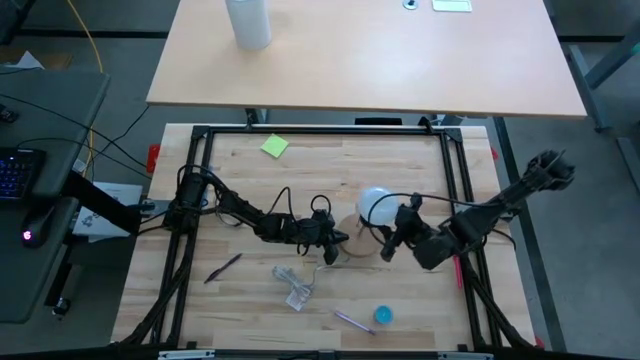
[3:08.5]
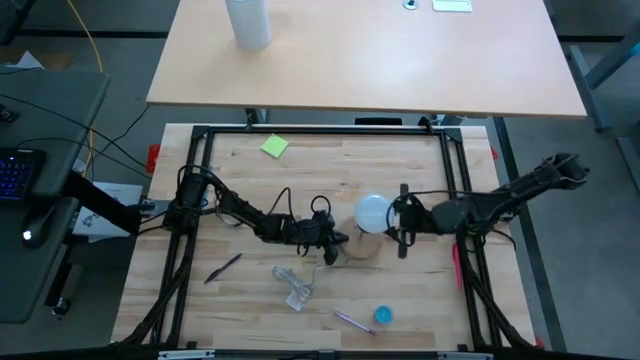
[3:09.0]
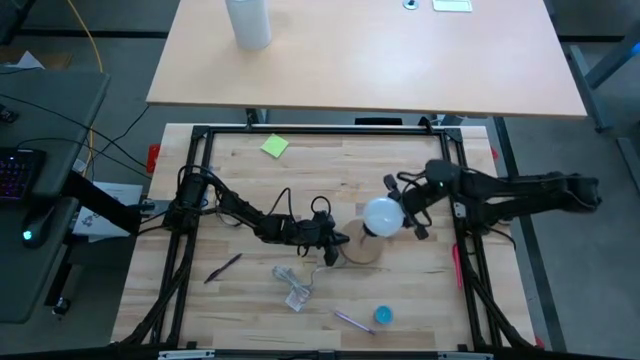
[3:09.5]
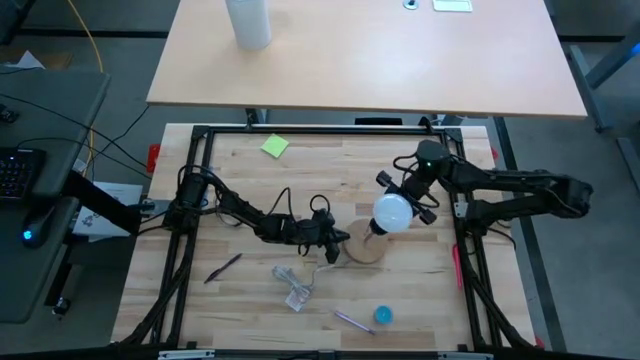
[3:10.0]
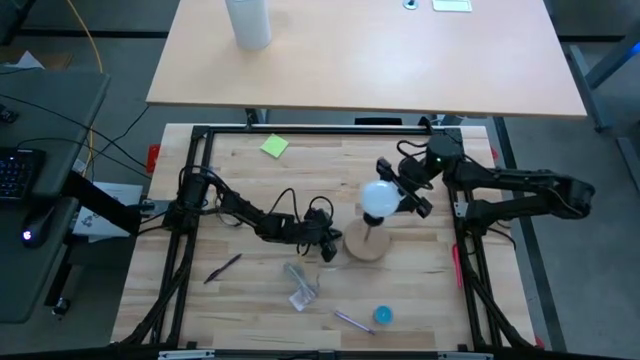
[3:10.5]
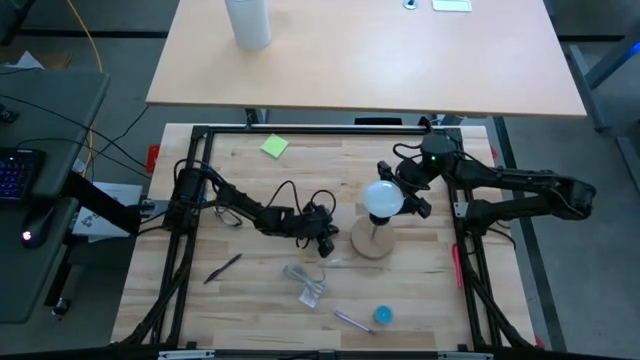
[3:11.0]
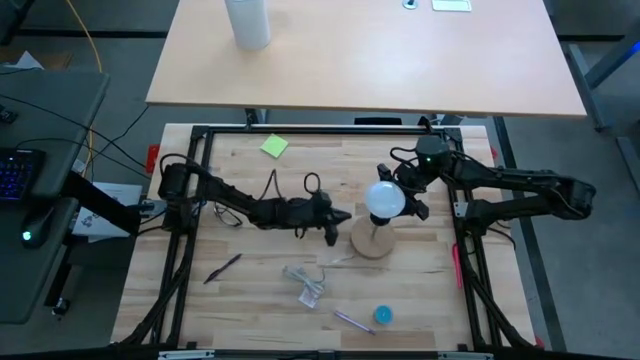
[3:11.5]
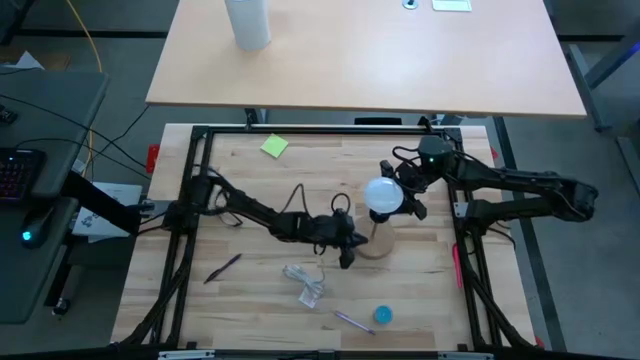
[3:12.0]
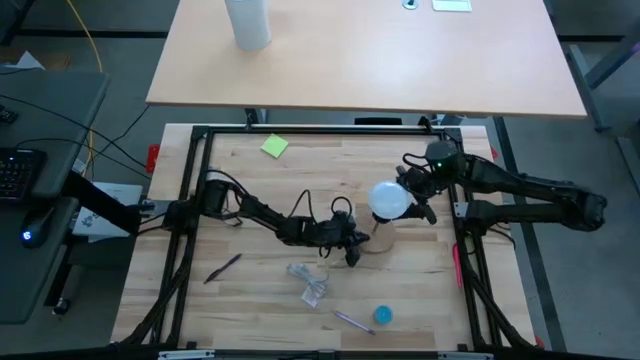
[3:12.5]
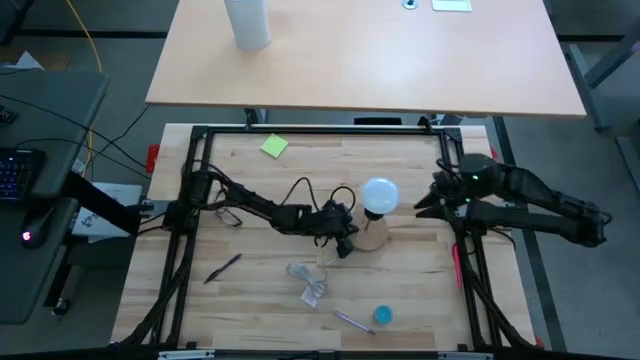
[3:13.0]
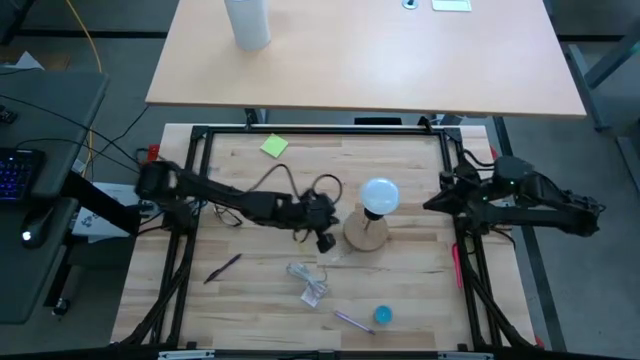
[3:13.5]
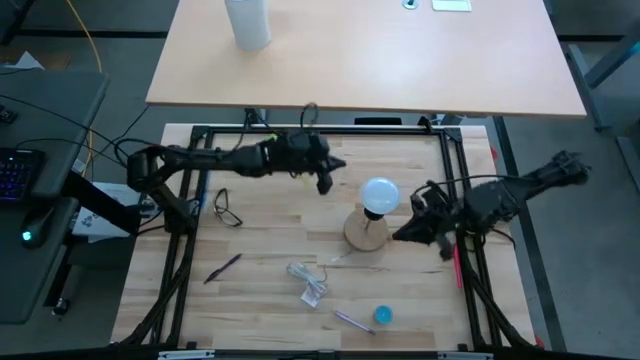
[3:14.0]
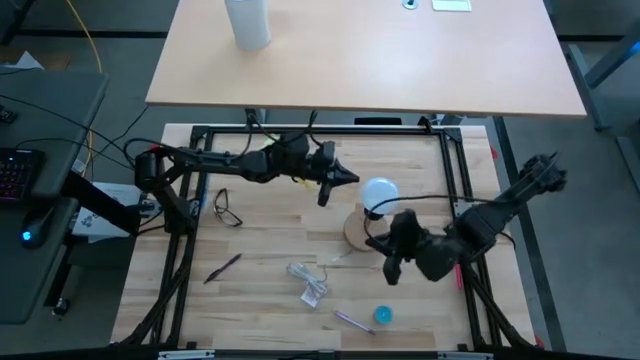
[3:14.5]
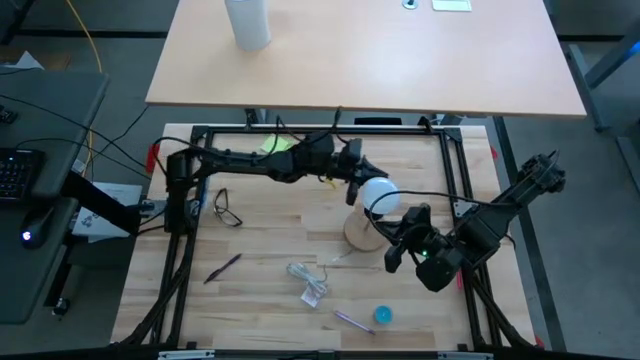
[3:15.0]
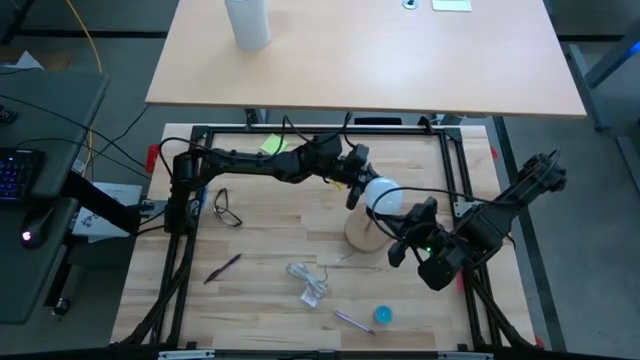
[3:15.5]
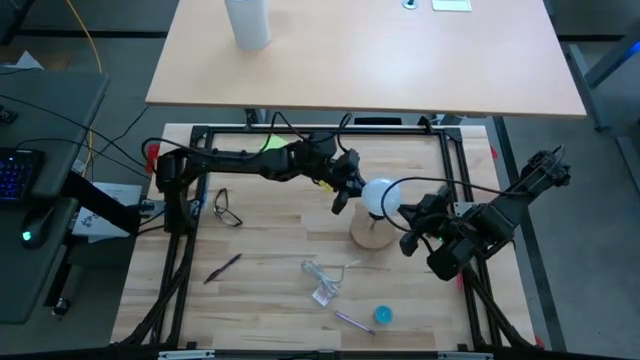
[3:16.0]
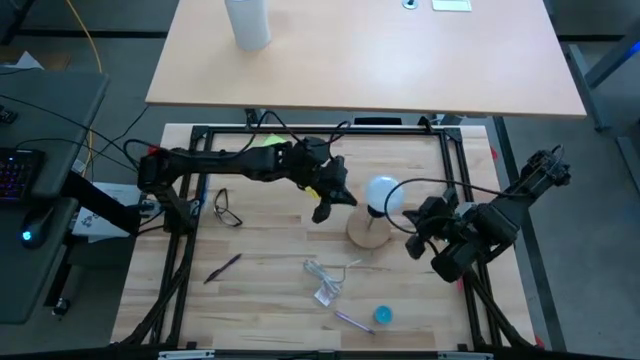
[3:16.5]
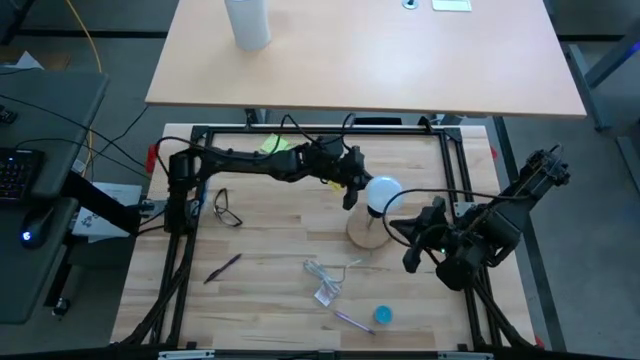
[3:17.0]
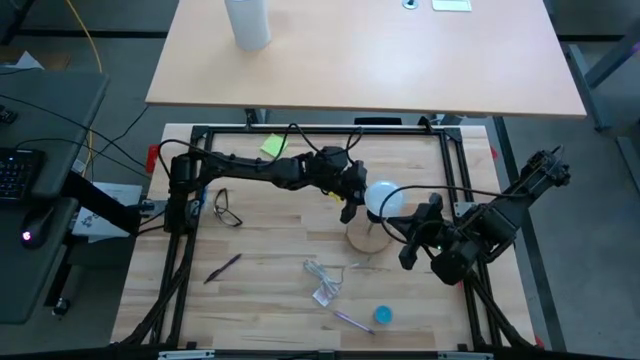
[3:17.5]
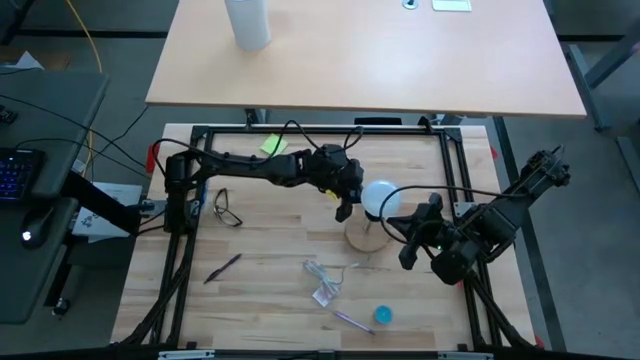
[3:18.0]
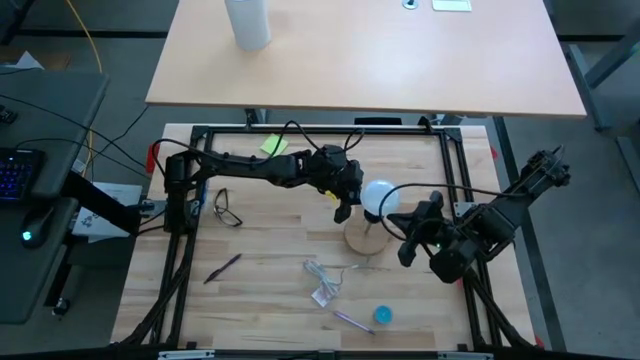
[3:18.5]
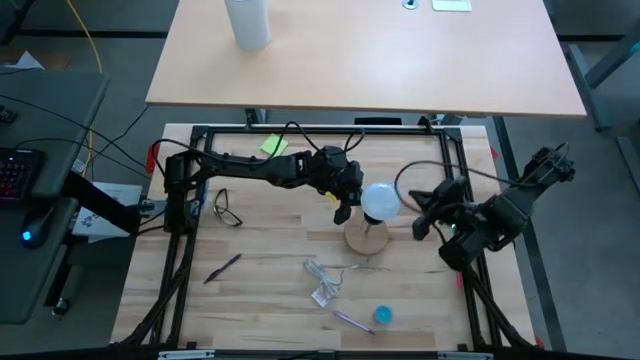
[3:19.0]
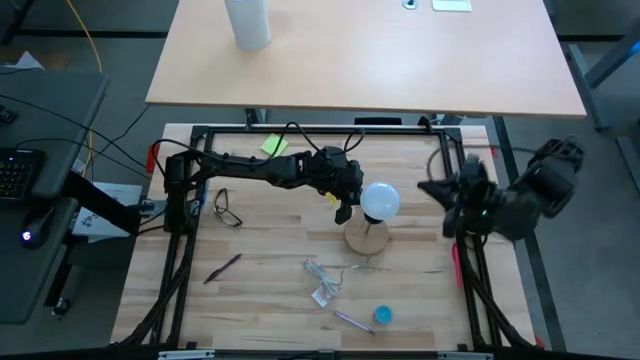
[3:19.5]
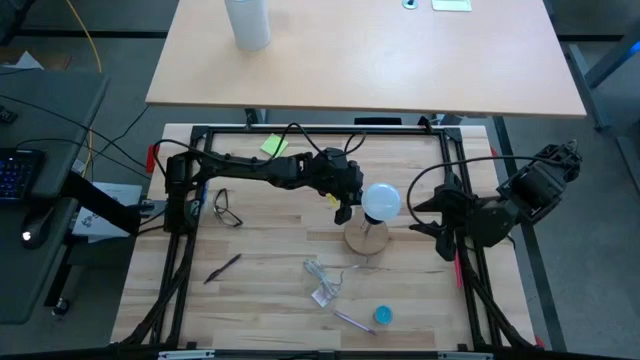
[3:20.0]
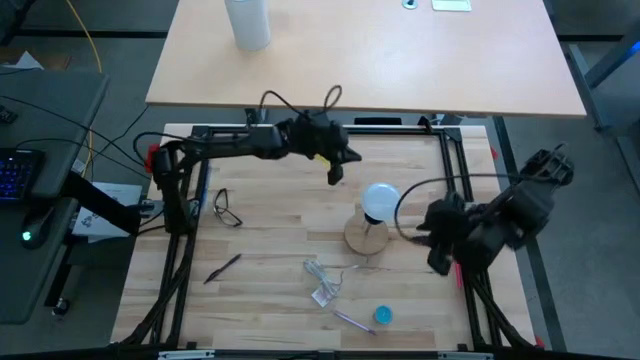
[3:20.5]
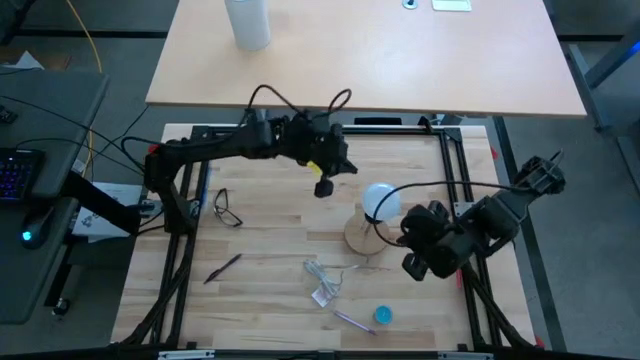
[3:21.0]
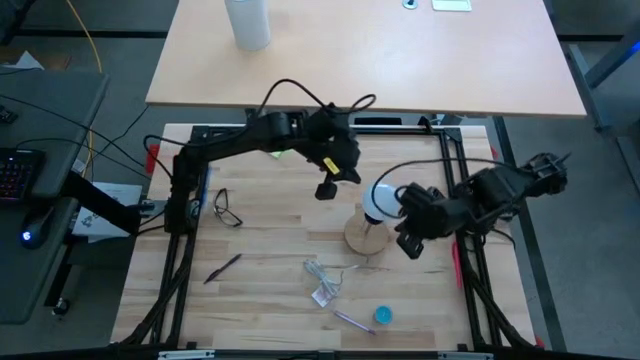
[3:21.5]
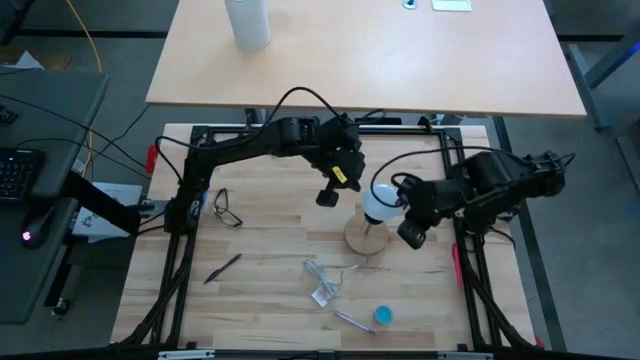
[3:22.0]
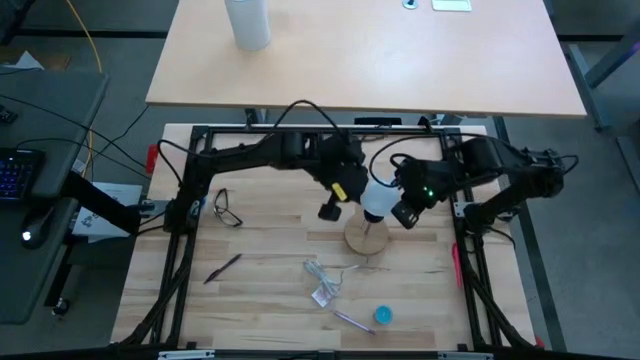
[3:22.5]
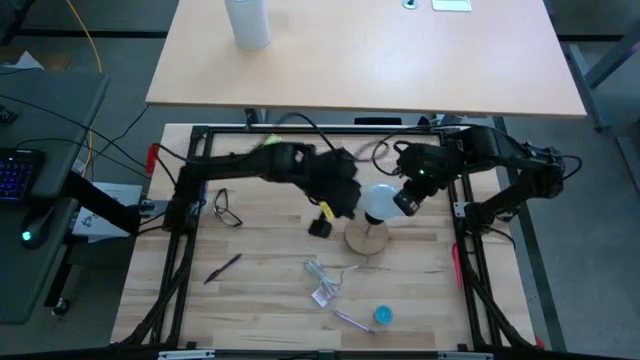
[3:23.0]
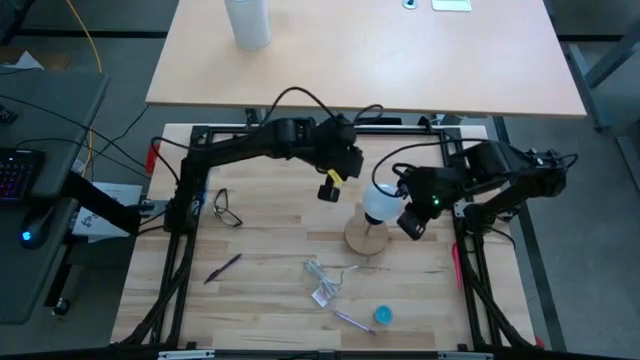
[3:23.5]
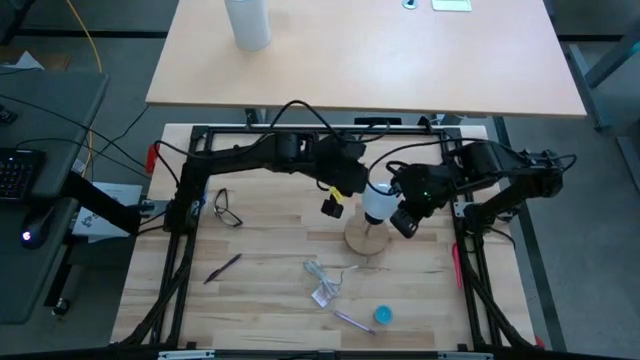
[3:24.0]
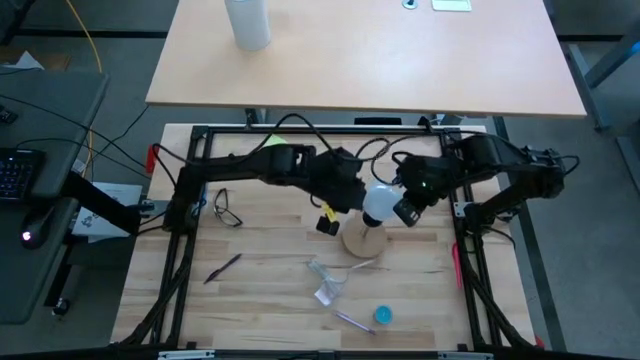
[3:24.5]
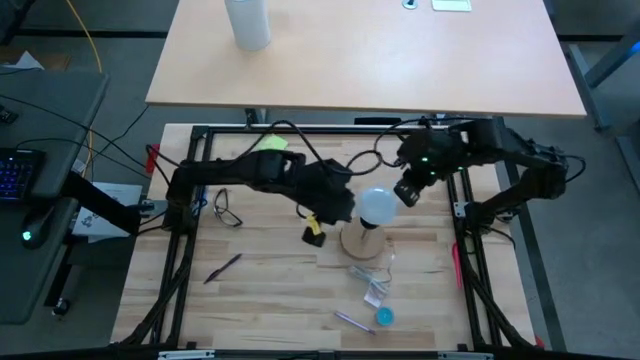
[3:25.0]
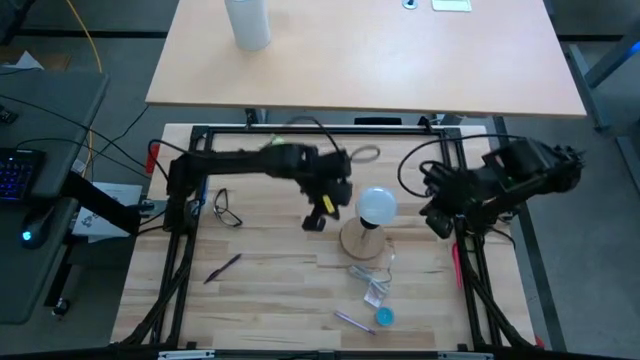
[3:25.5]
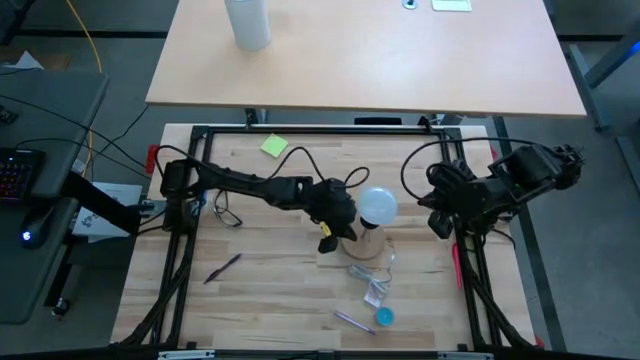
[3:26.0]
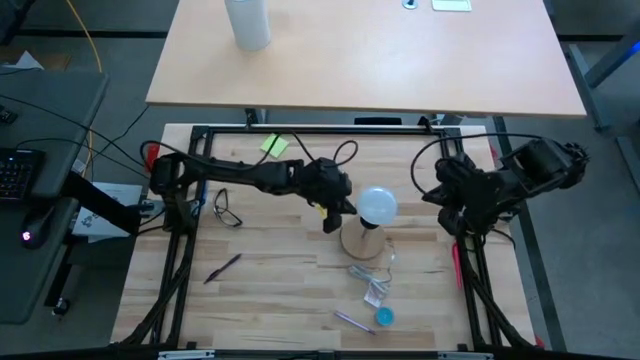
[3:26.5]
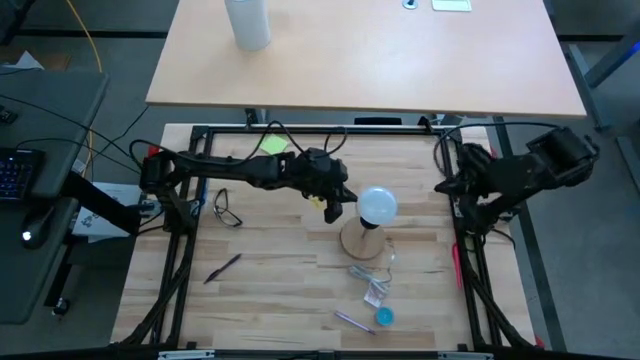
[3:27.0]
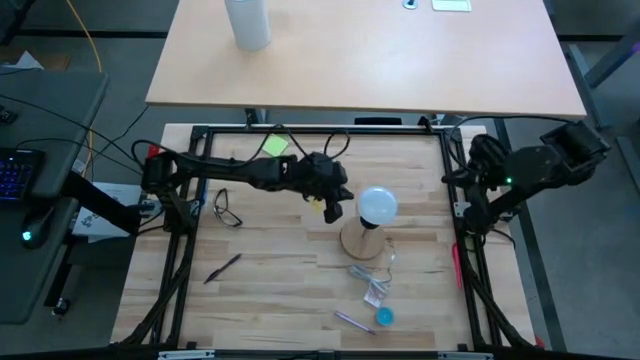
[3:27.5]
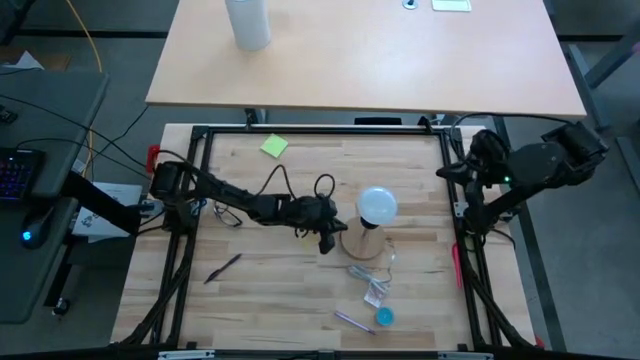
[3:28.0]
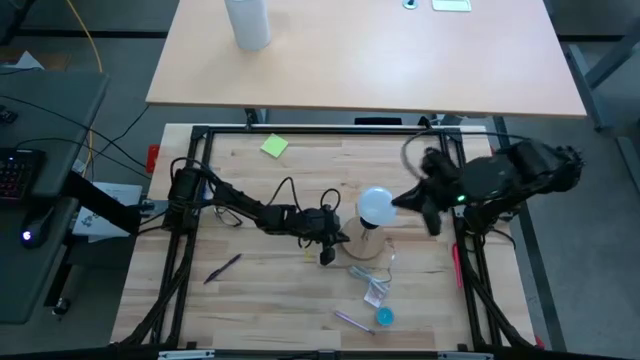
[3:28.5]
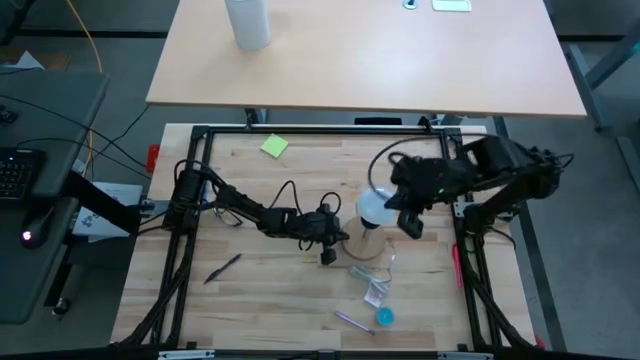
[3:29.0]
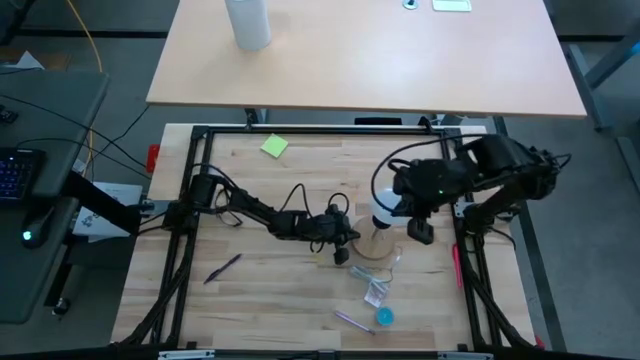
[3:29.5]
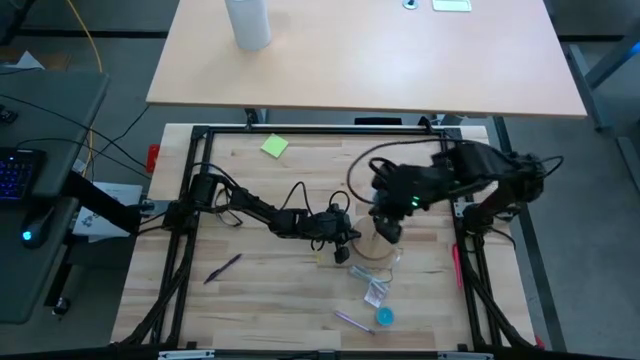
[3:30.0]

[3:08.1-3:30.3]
Task: Screw lightbulb
Remove the lightbulb from the lamp
